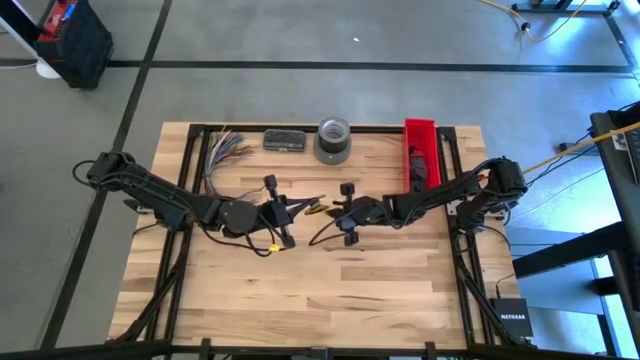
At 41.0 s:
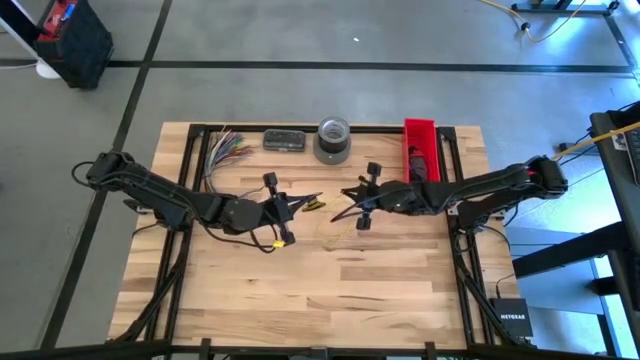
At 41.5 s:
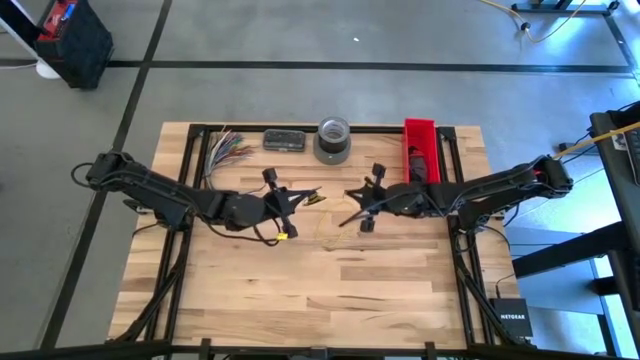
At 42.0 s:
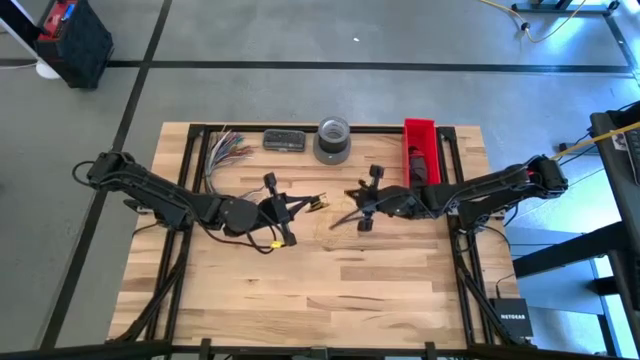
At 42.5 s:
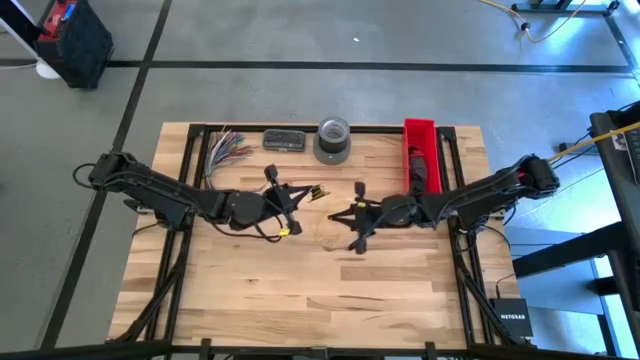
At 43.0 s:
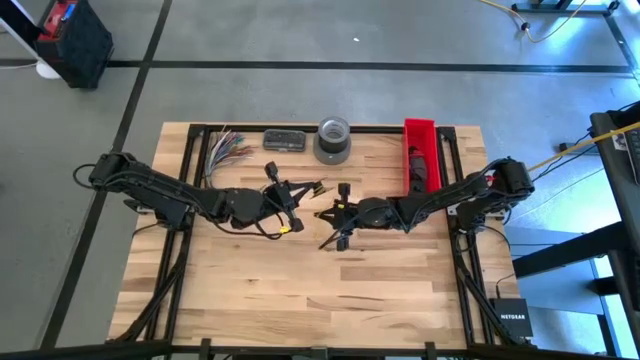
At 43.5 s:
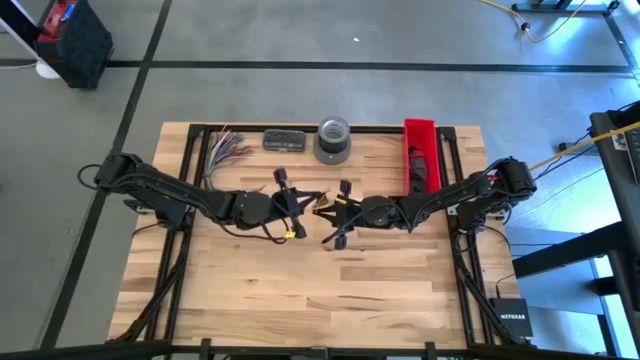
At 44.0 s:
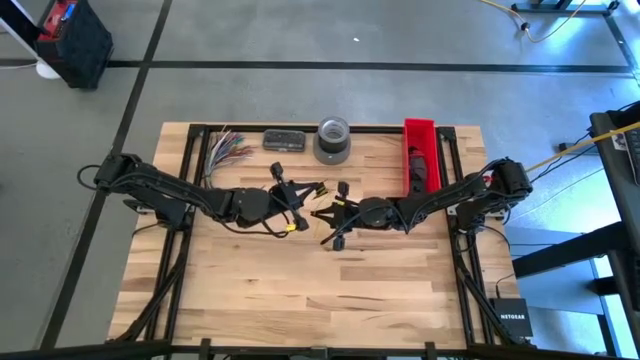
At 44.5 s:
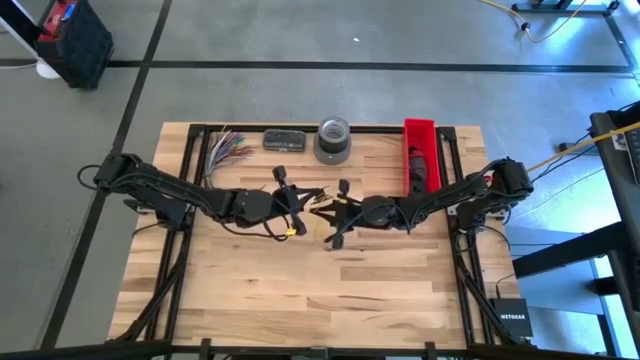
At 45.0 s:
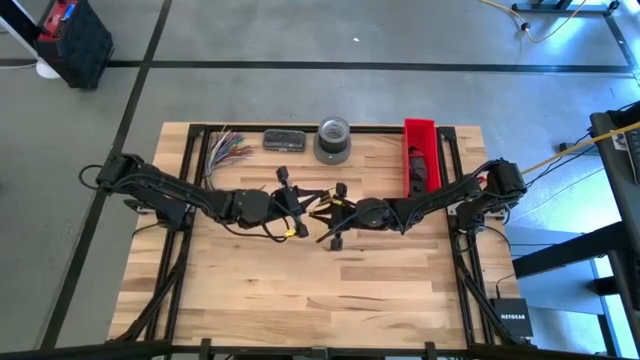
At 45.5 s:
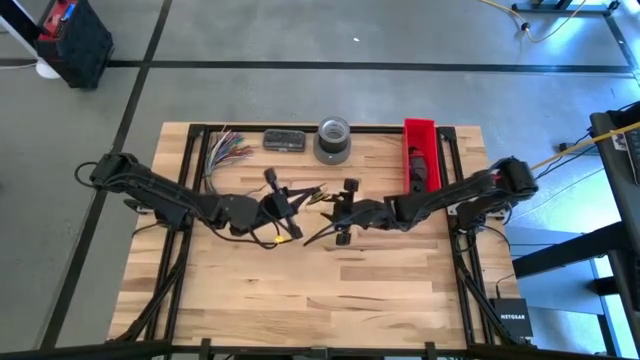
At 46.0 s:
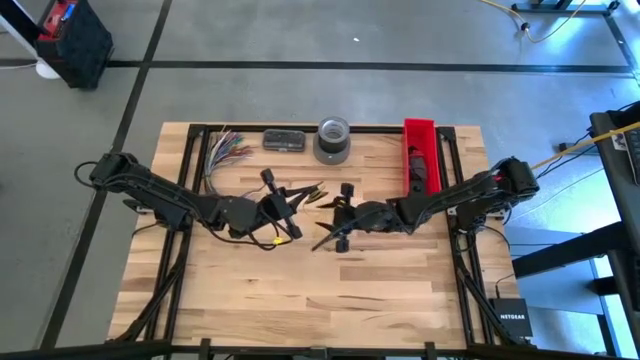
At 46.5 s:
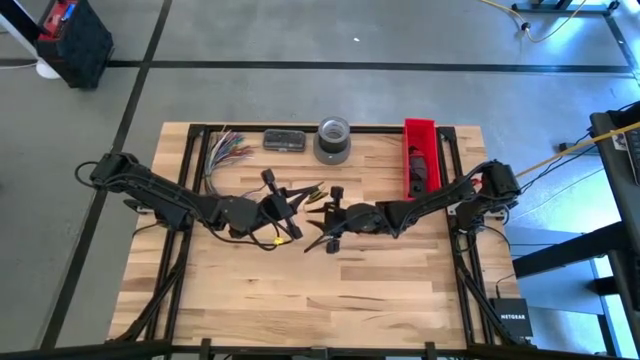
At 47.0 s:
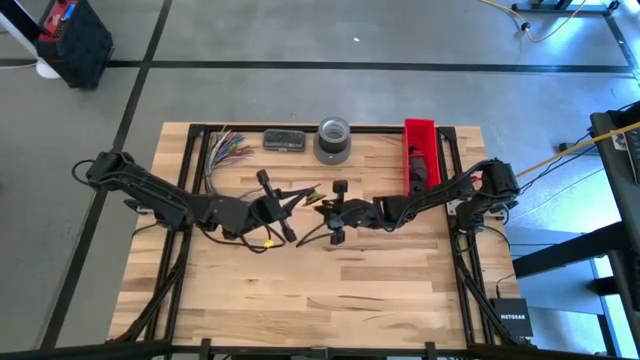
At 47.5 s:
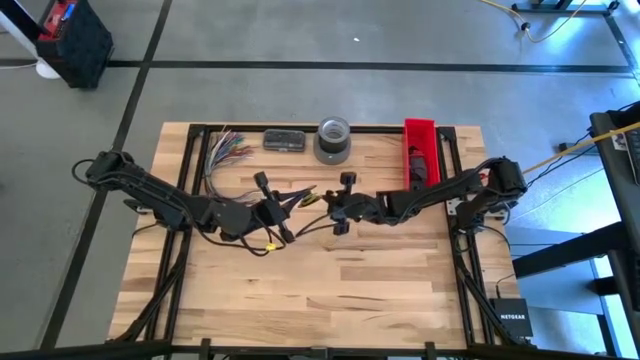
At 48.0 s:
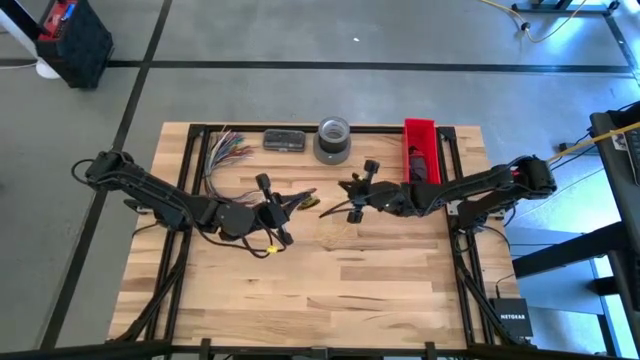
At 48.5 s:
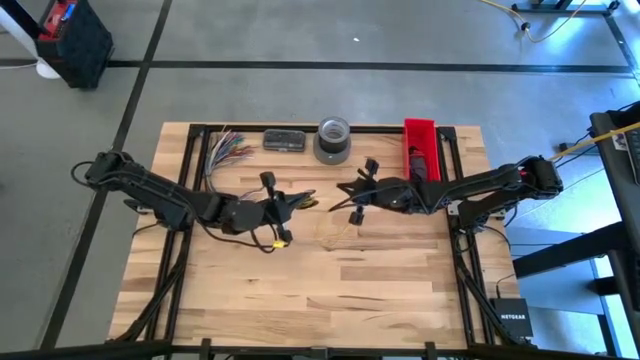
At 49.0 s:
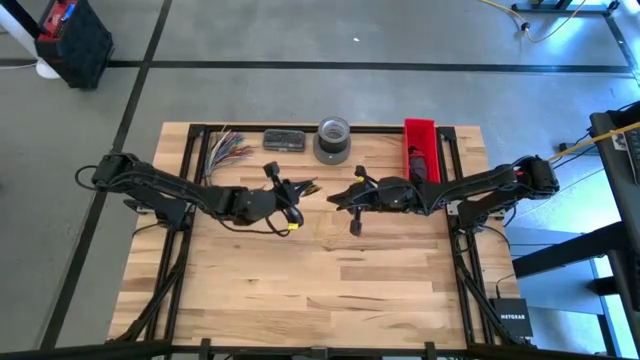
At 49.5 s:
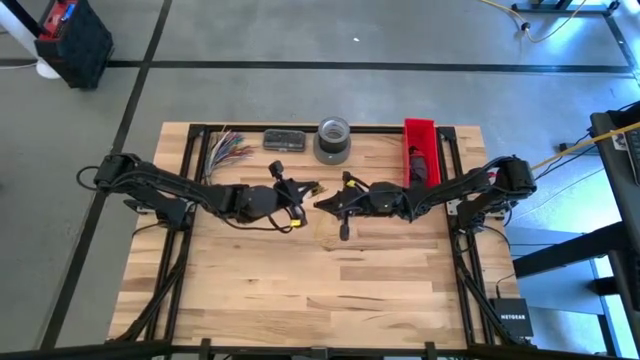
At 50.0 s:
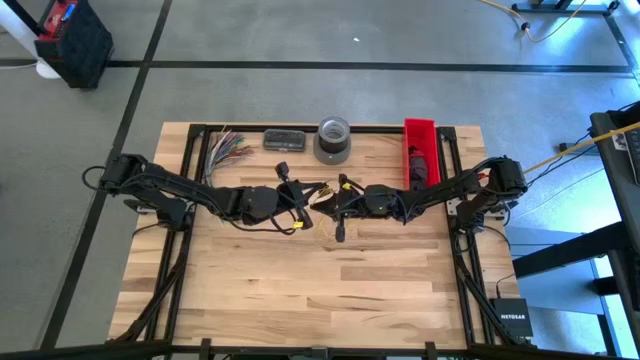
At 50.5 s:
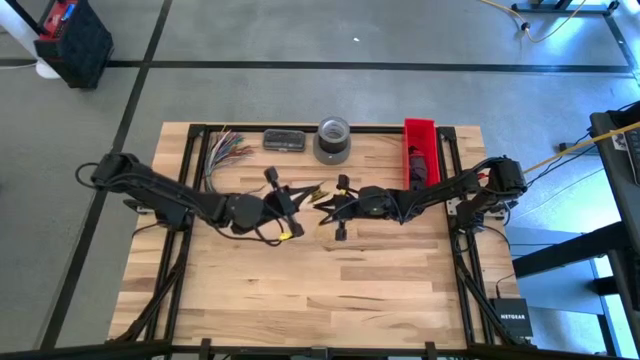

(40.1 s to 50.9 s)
Task: Coil cords
Coil the yellow wire into the black spool

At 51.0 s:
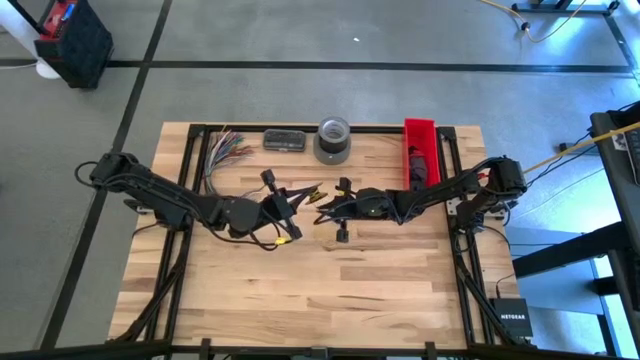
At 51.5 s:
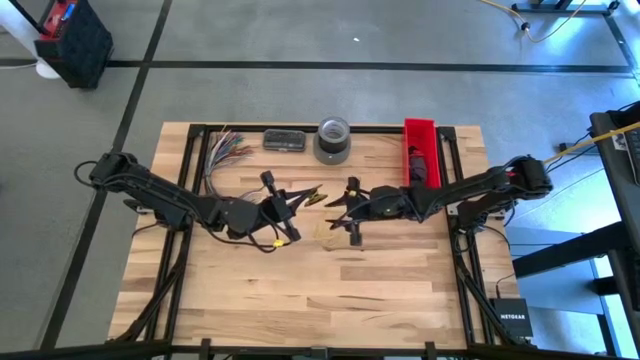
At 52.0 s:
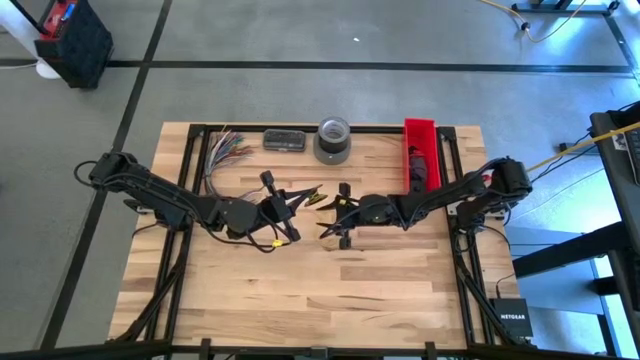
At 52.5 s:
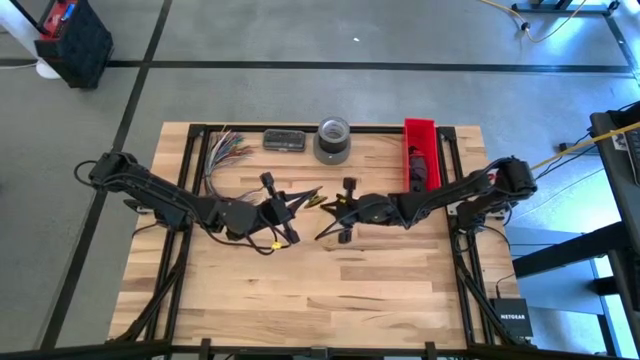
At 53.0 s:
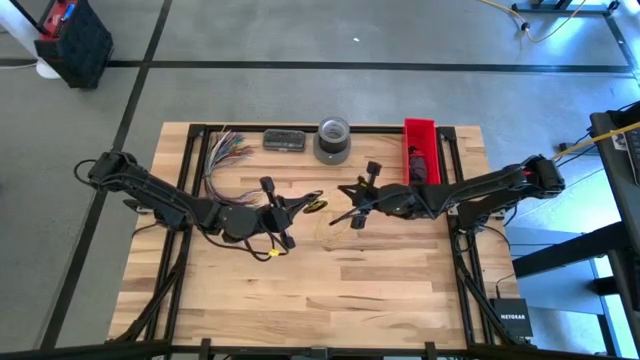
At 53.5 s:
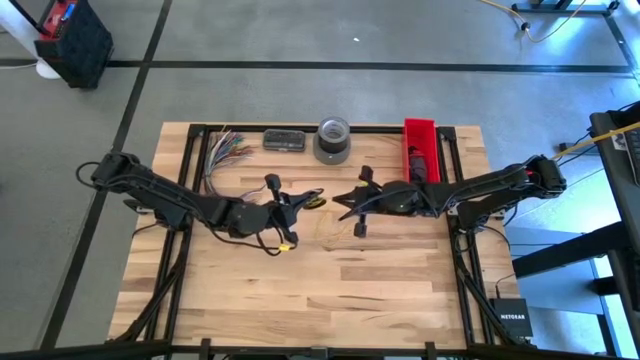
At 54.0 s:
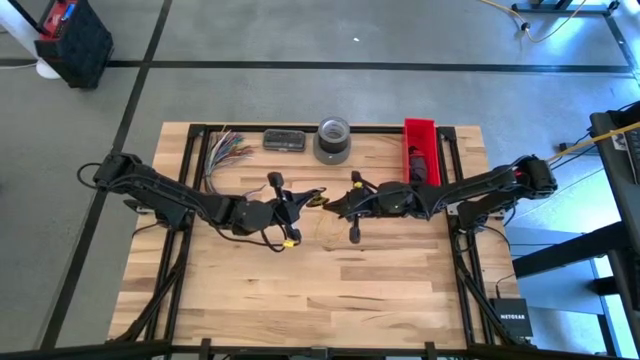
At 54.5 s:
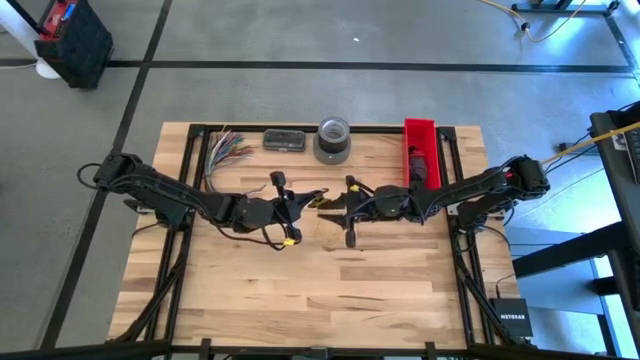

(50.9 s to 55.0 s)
Coil the yellow wire into the black spool

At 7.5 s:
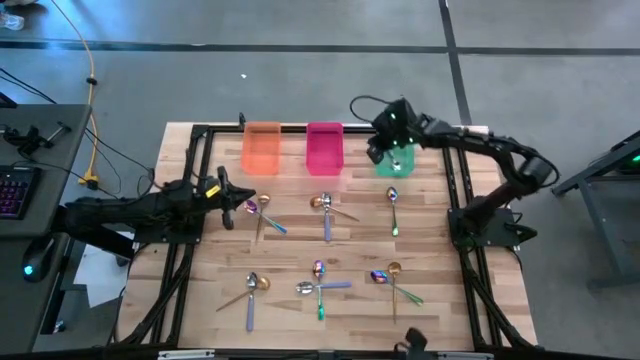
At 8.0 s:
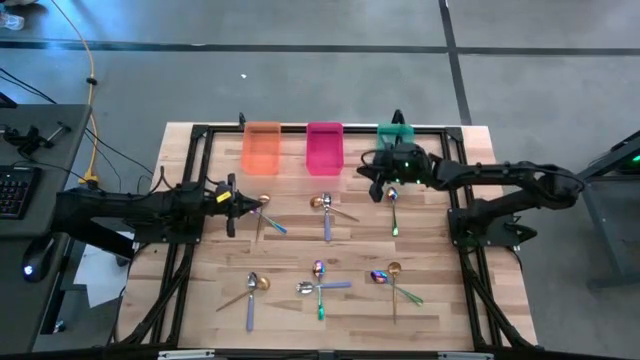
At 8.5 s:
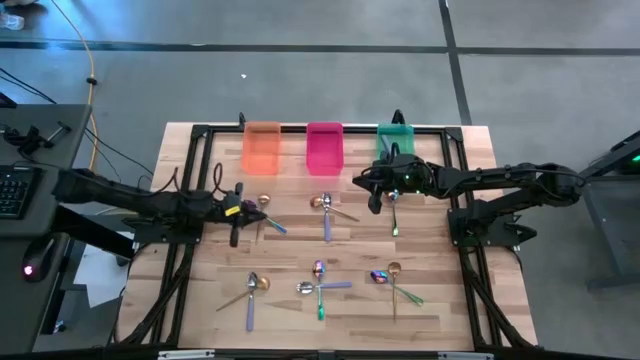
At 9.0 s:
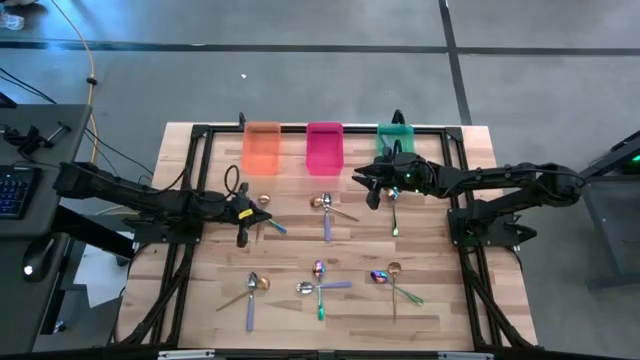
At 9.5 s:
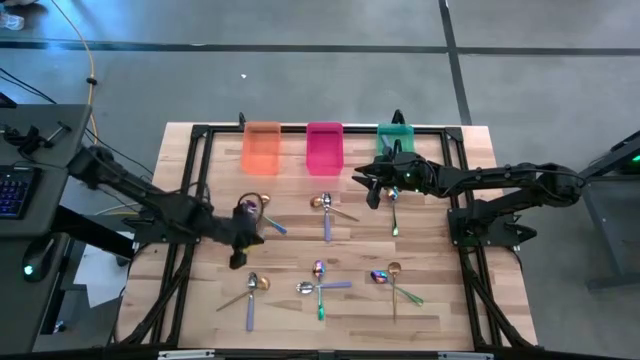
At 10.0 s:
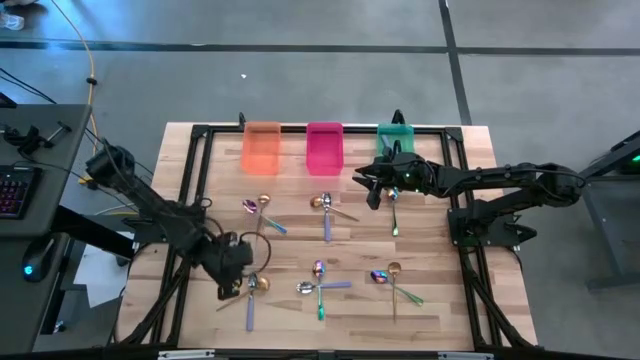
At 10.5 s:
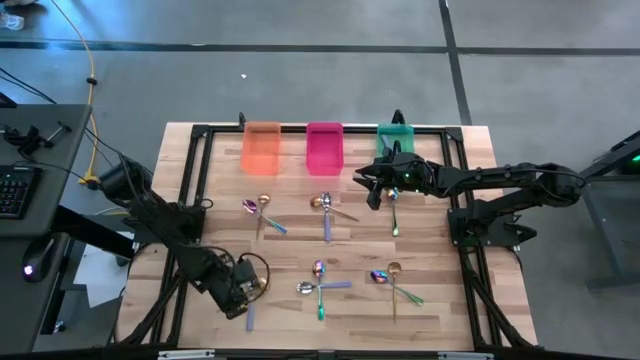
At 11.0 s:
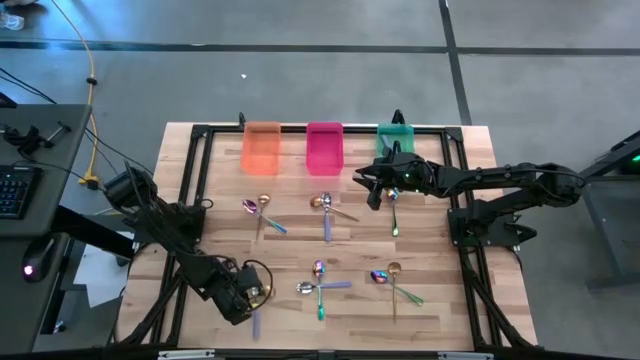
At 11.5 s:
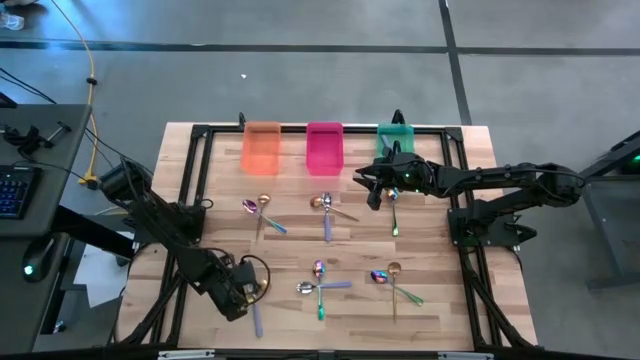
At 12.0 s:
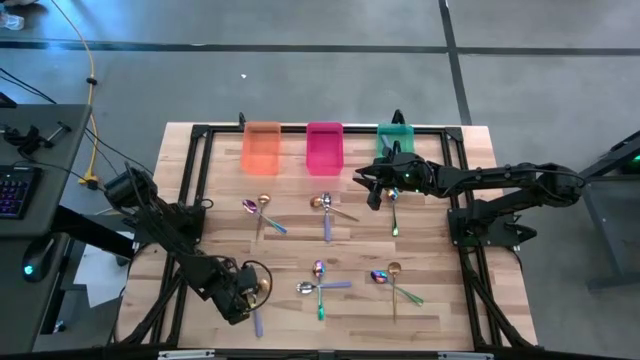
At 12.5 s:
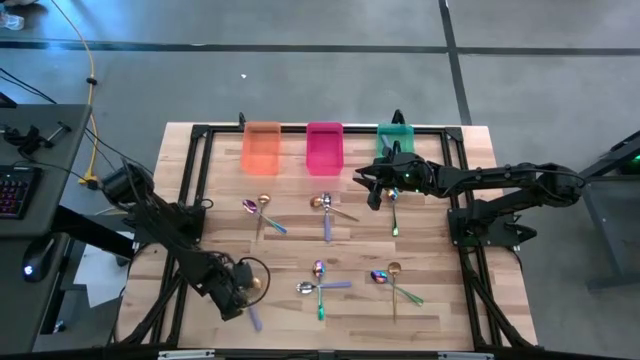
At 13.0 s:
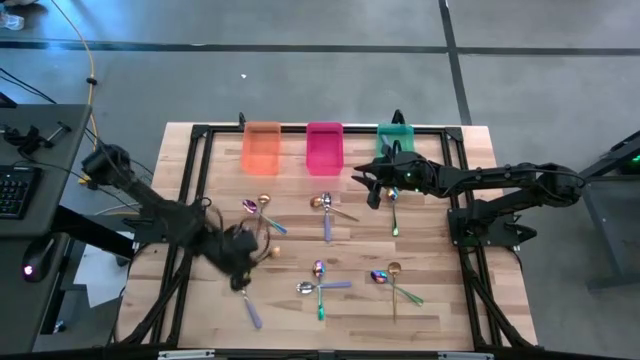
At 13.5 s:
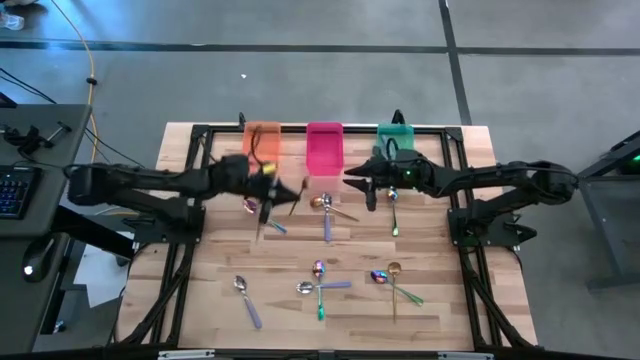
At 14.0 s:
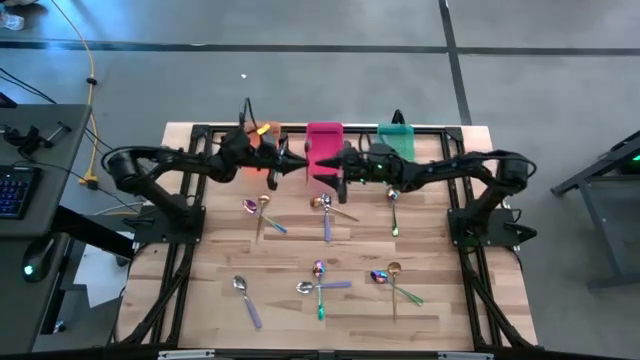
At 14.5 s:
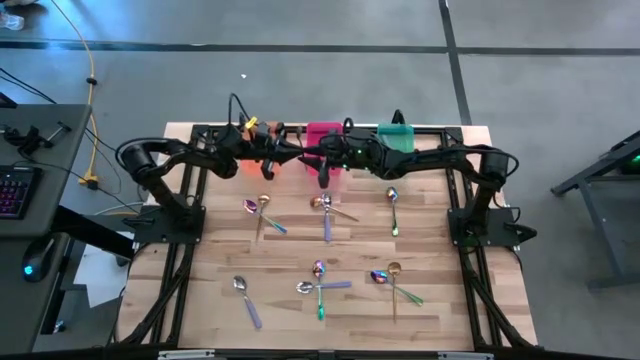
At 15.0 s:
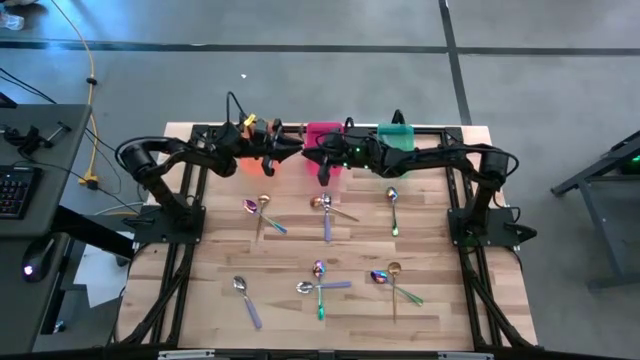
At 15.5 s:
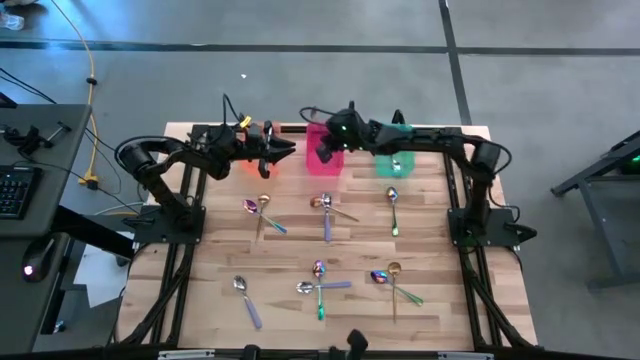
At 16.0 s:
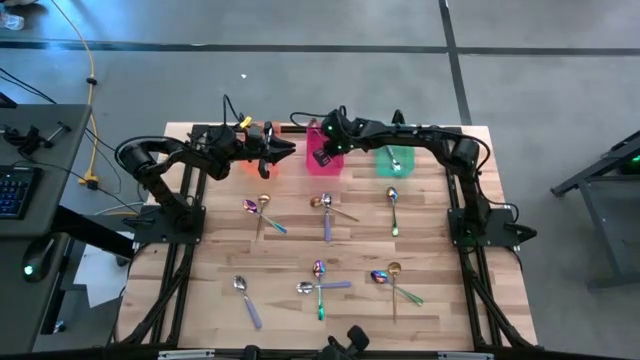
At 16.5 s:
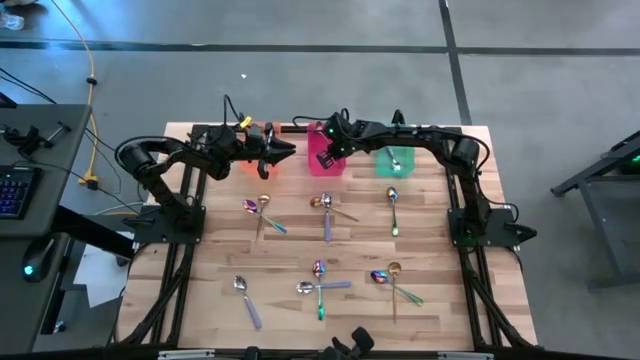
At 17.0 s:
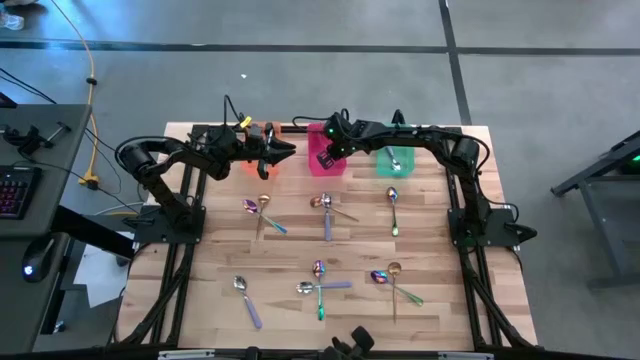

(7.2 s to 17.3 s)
Task: Sort silverware by color (type)
Put the bottom left yellow spoon into the pink bin
